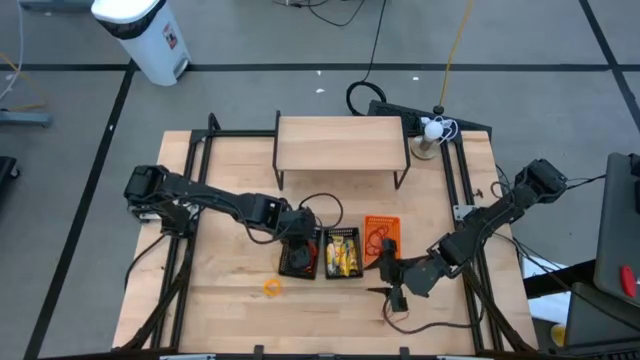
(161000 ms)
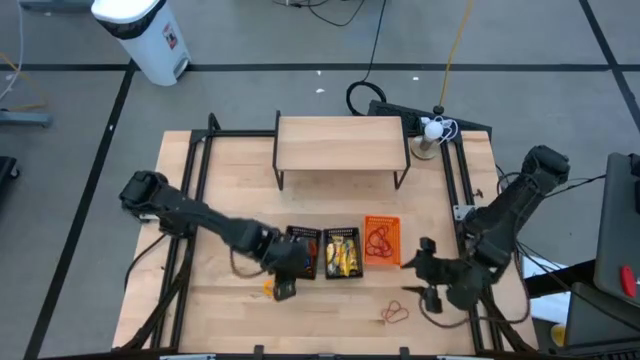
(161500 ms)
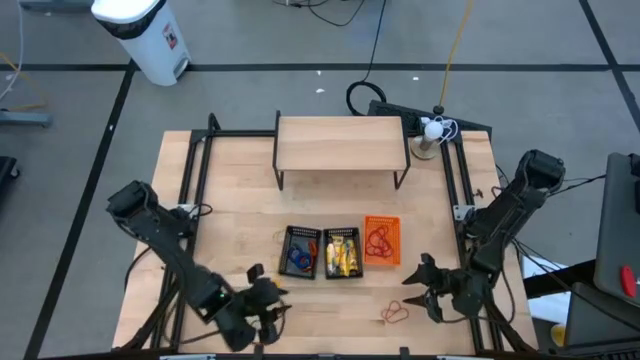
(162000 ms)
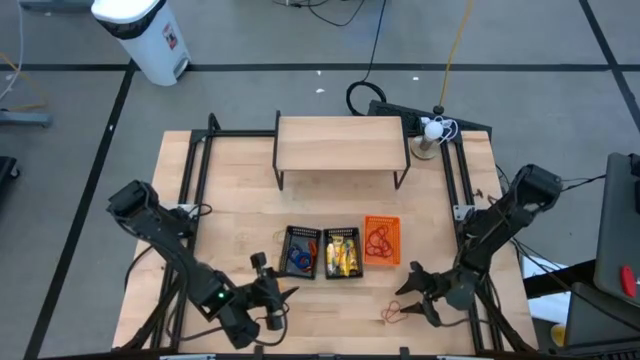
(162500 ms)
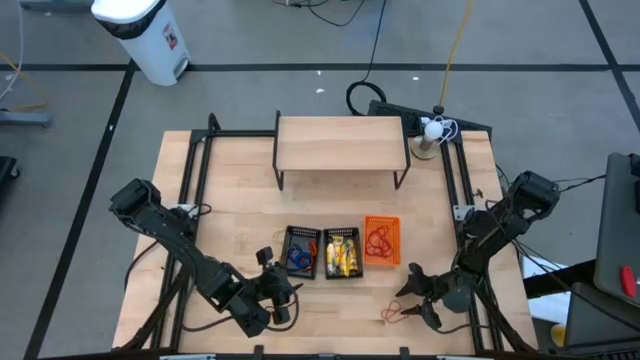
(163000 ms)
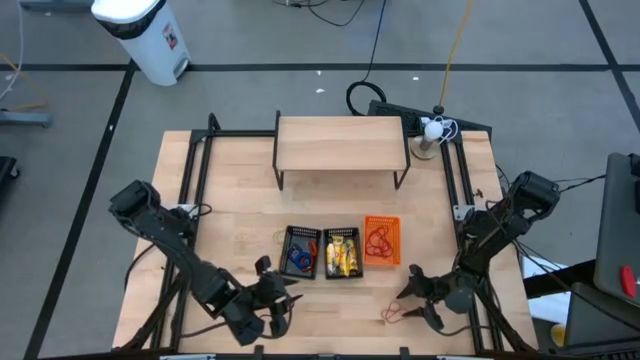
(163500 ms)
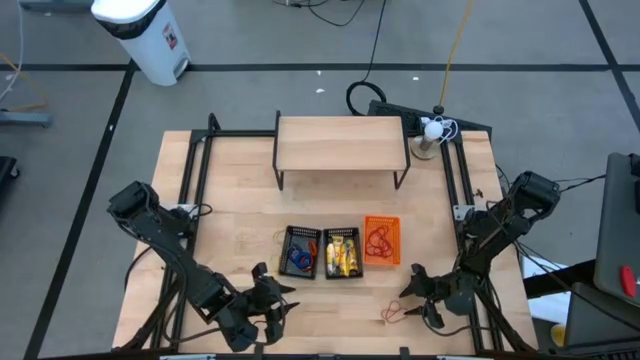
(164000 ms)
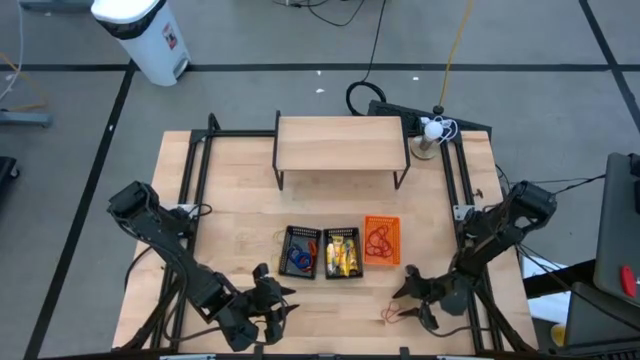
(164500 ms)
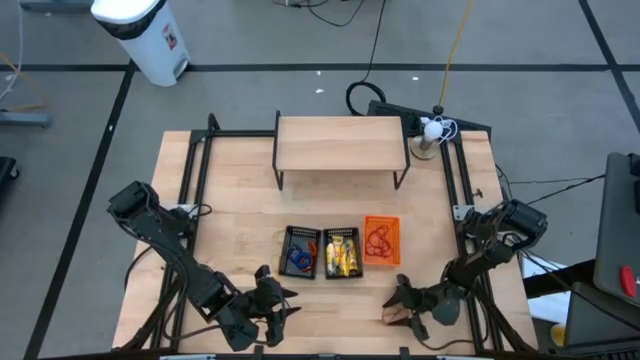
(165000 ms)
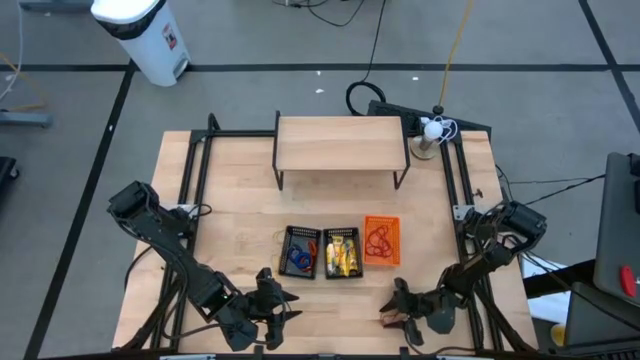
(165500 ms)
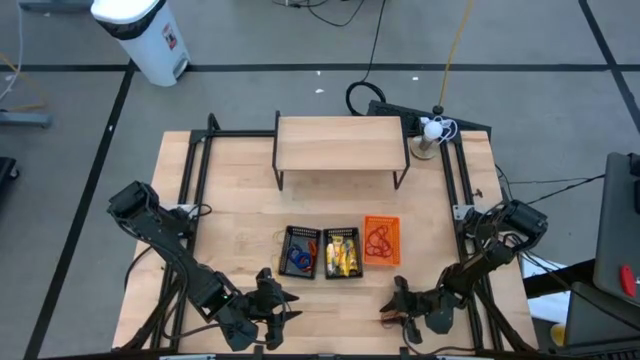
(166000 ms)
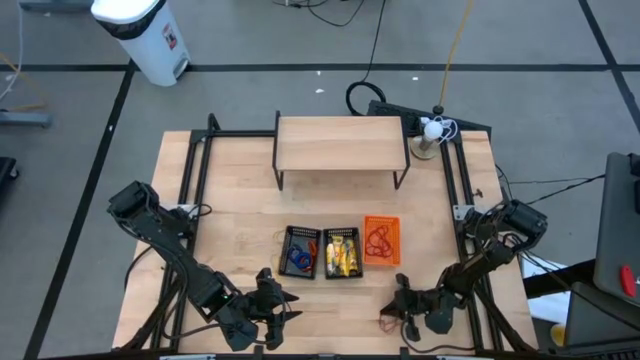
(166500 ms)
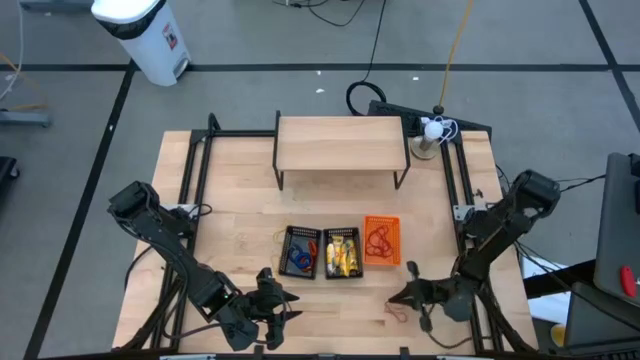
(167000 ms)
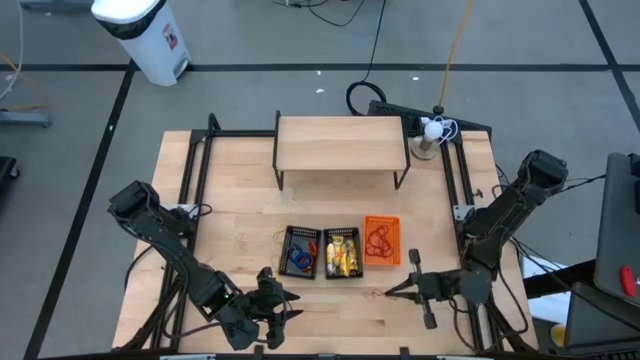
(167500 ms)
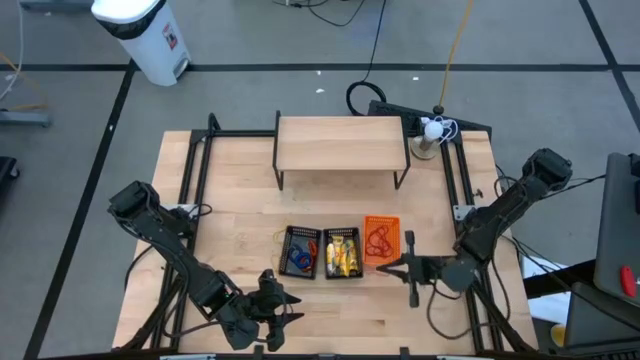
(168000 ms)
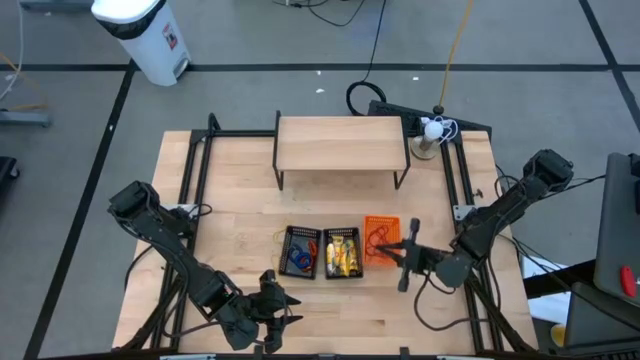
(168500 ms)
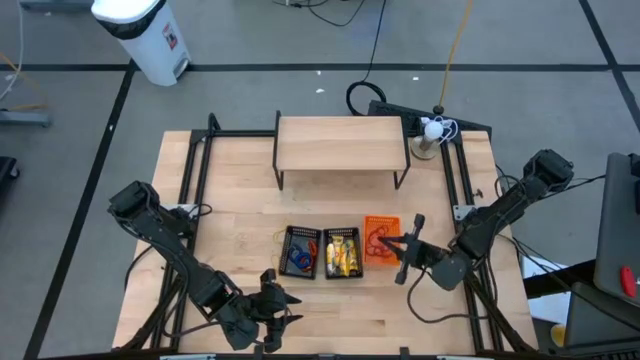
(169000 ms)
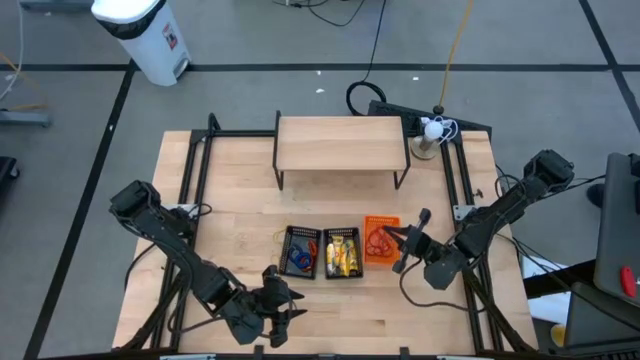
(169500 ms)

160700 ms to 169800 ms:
Task: Pick & Place Office Desk Supplies
Put the rubber band into the orange basket

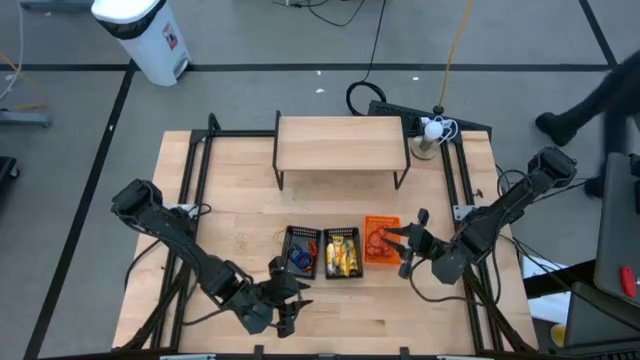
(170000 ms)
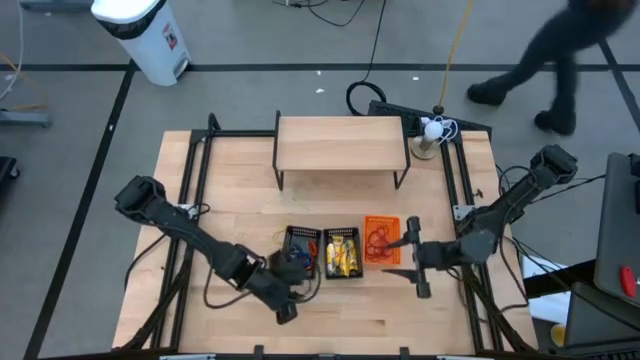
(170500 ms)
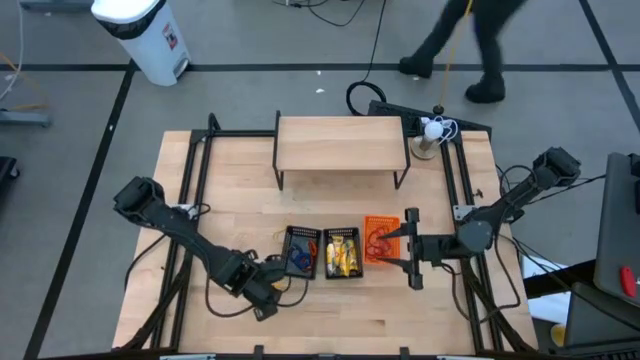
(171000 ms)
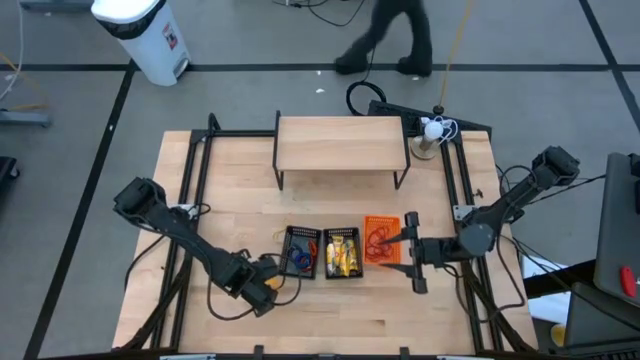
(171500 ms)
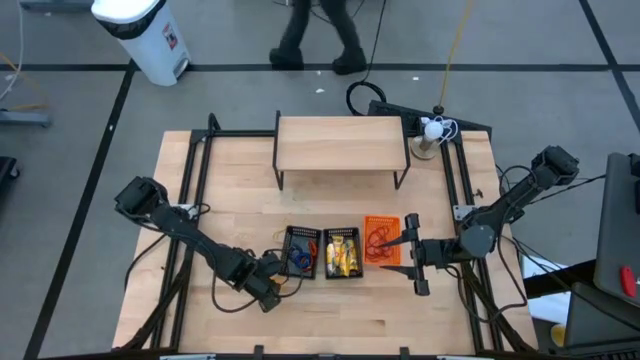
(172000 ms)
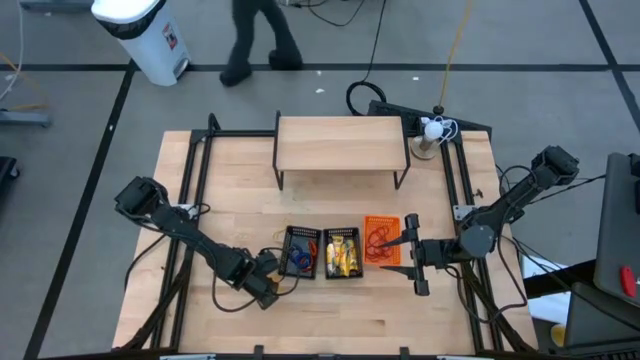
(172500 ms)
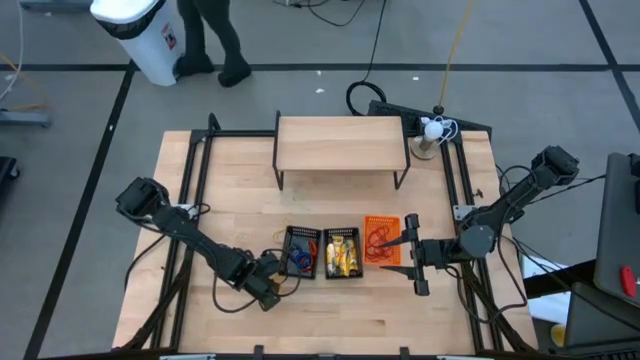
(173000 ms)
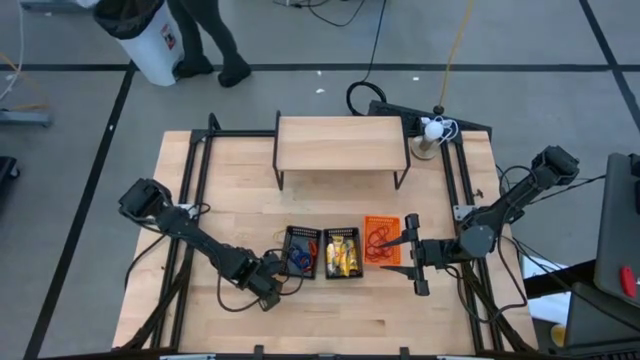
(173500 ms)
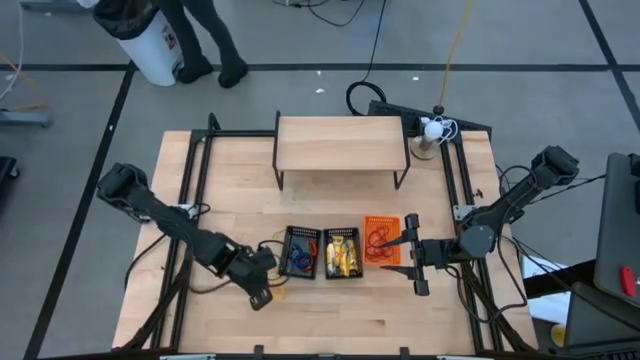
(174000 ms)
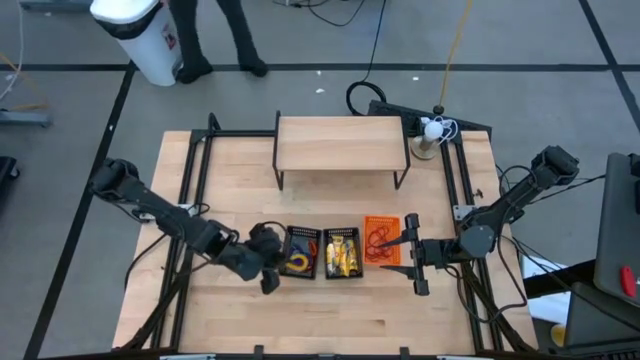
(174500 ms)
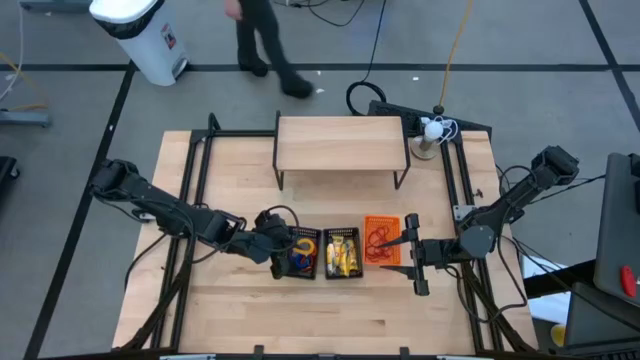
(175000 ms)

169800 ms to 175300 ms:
Put the yellow spring rubber band into the left black basket

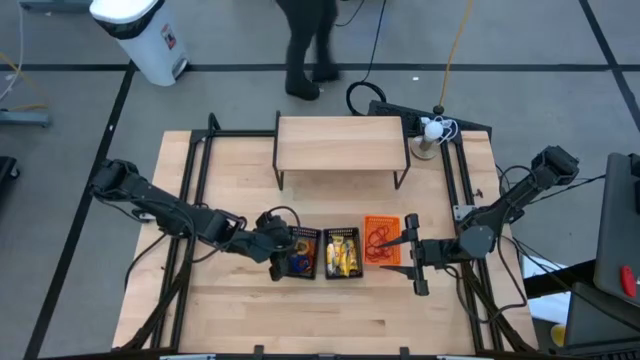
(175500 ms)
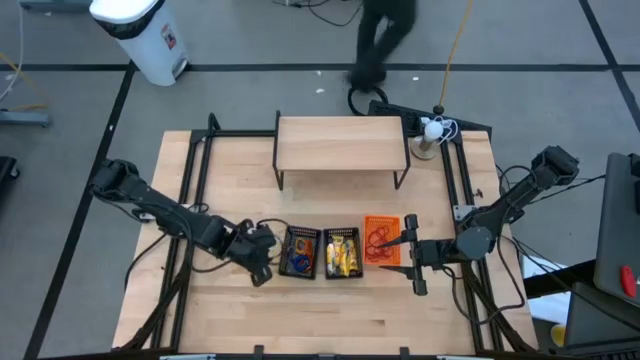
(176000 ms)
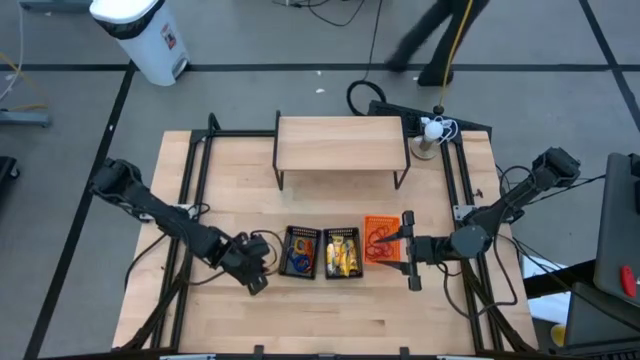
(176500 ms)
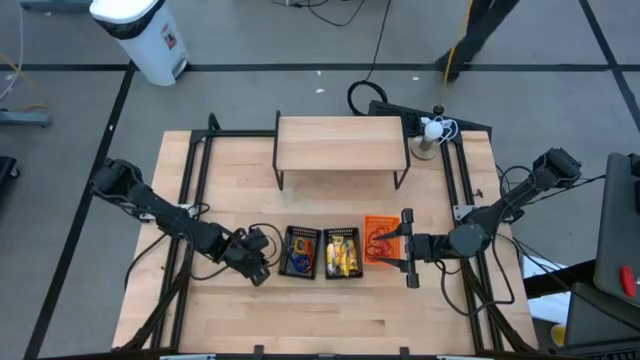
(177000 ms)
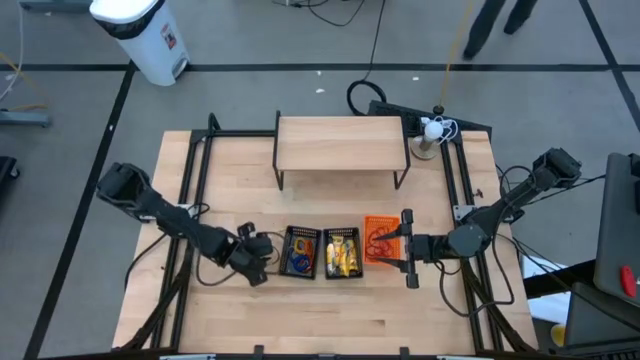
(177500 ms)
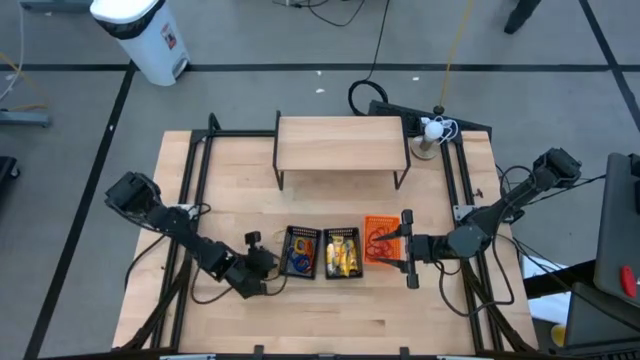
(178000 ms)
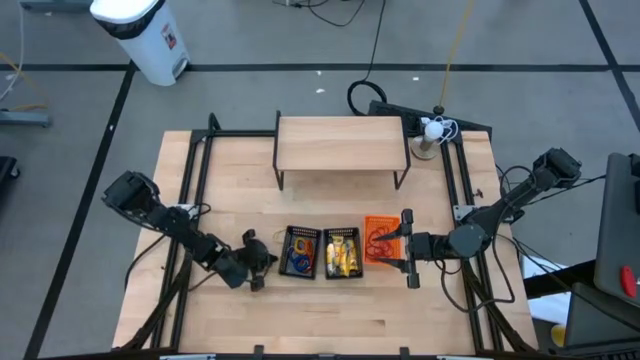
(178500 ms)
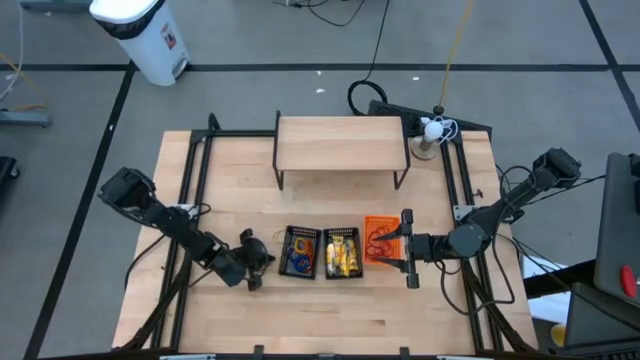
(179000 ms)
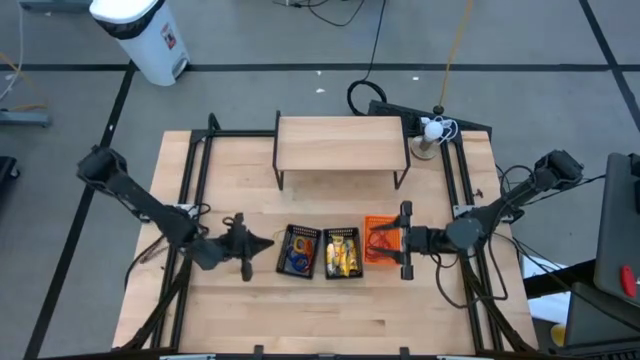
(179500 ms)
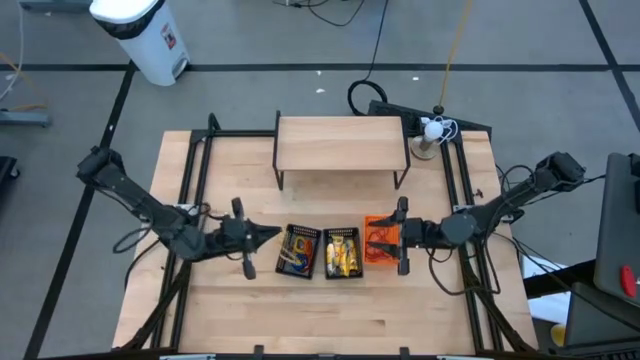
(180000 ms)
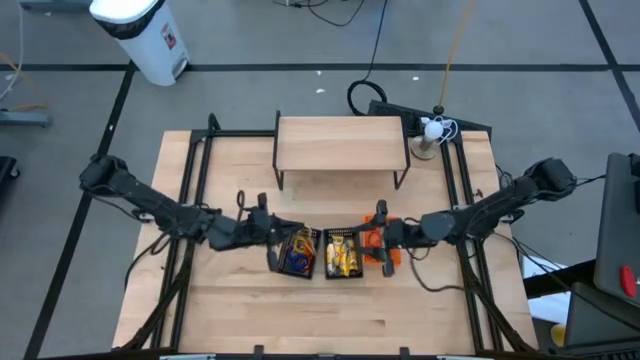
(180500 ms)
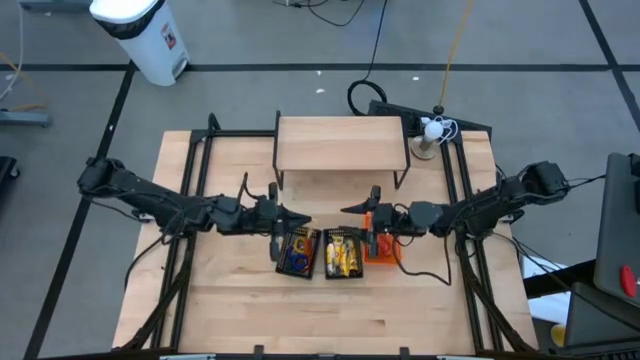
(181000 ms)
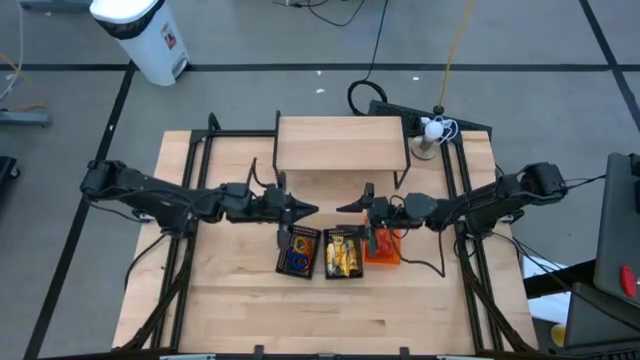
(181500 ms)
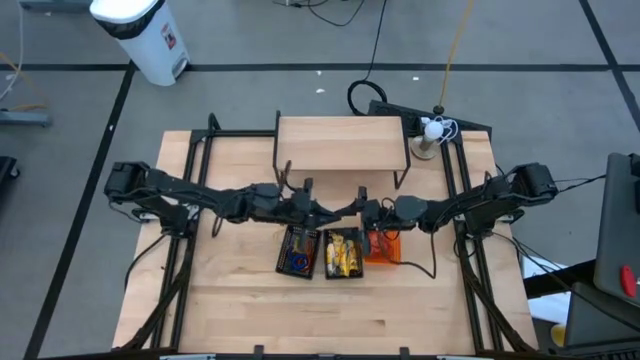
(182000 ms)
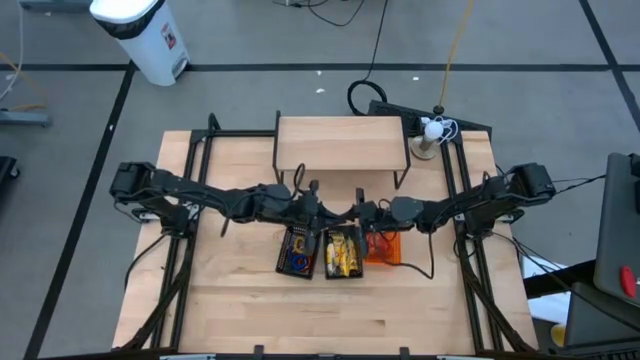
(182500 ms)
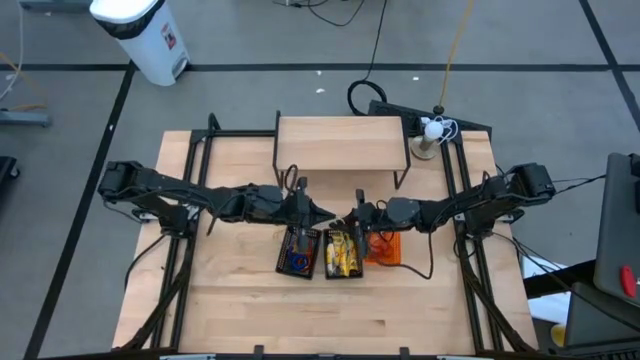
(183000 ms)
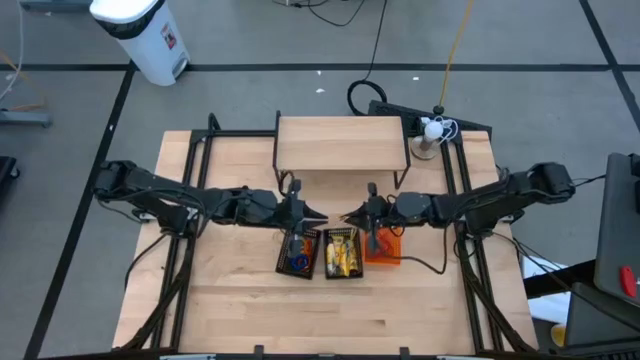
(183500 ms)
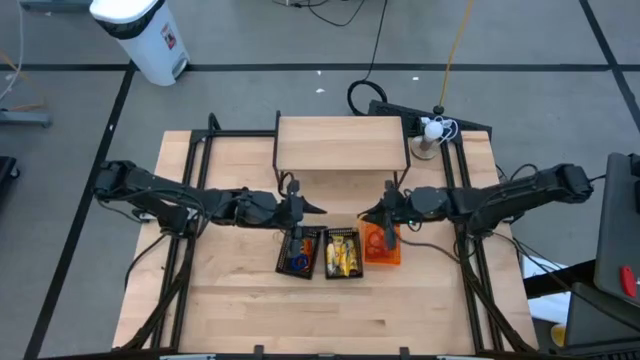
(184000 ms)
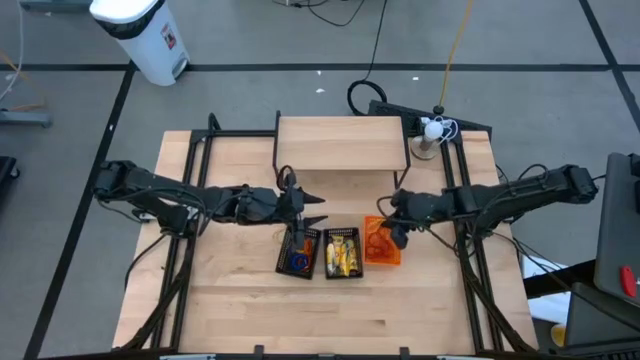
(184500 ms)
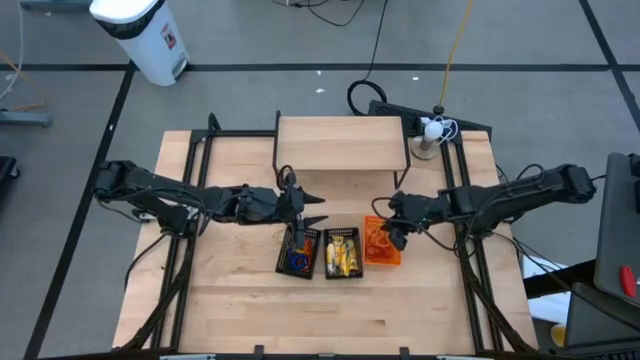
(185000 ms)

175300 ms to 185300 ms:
Put the bottom yellow rubber band into the orange basket
